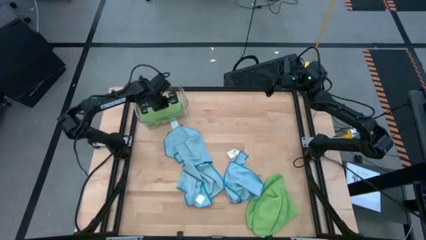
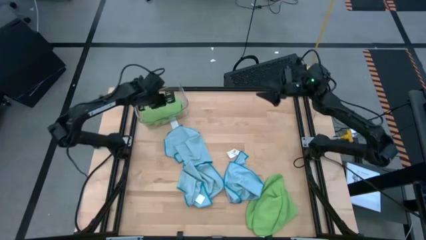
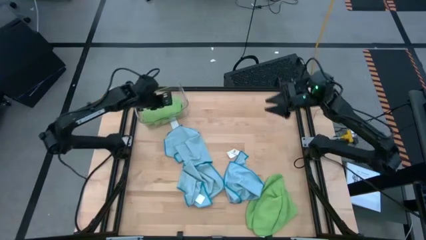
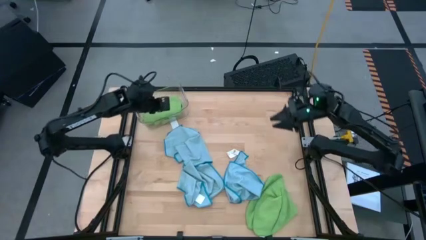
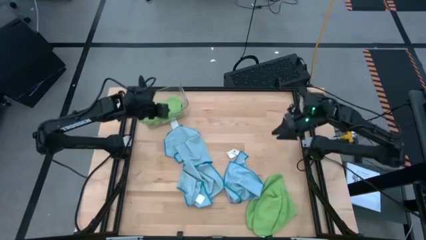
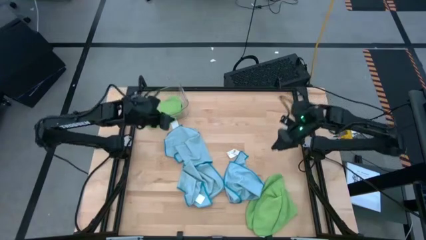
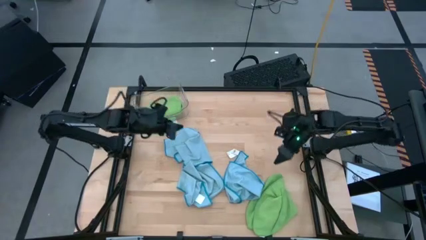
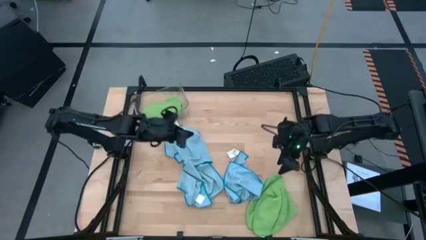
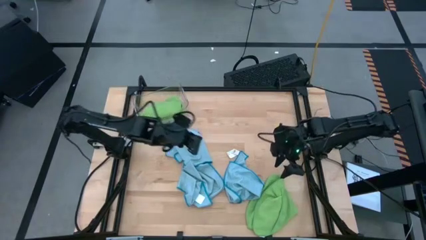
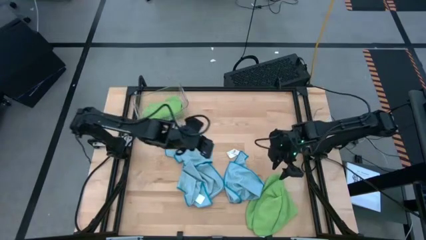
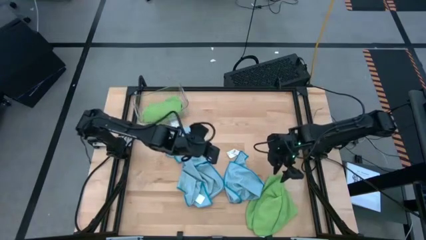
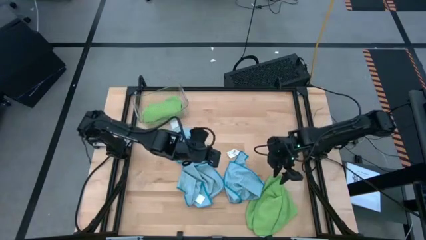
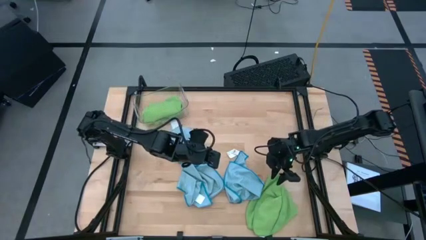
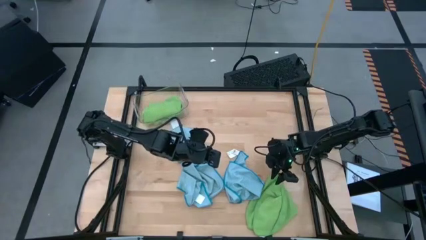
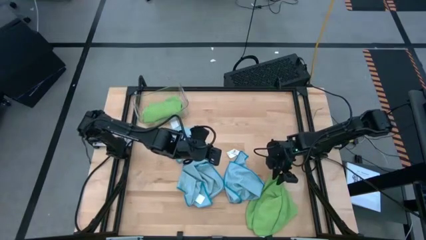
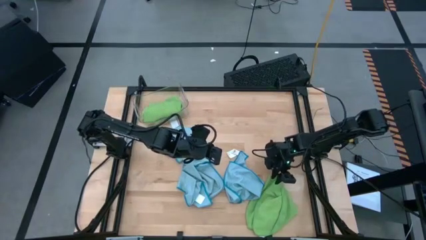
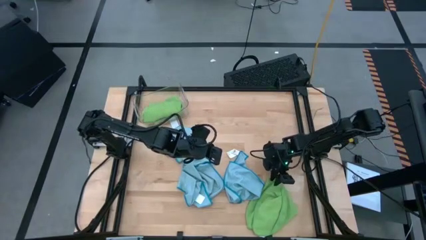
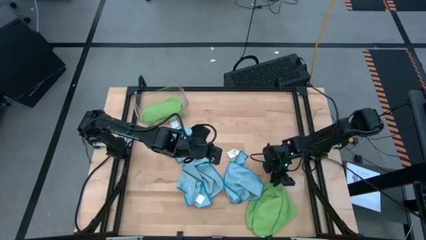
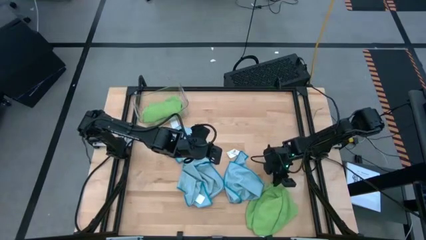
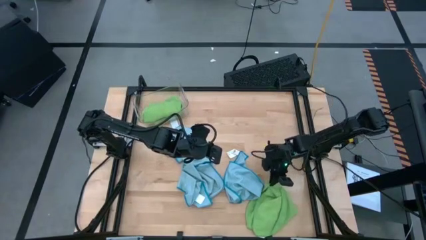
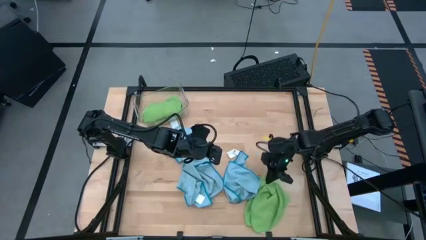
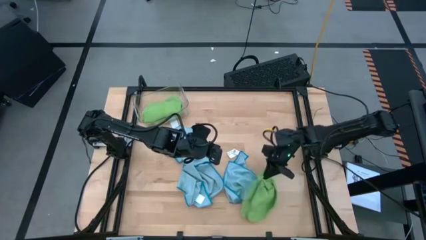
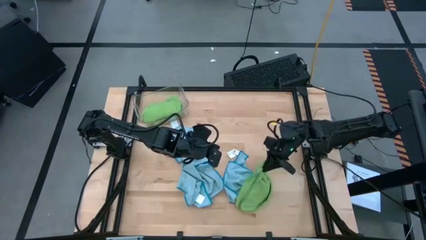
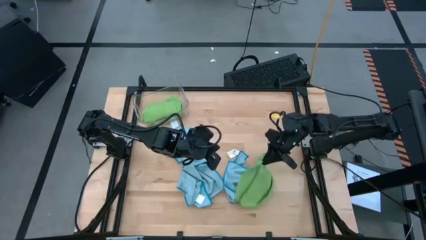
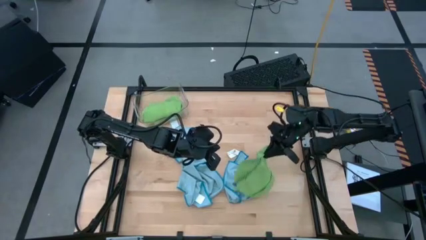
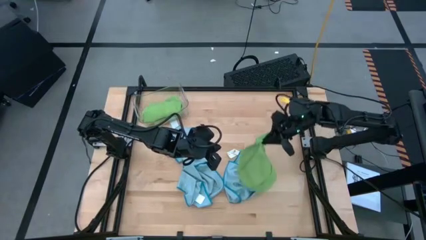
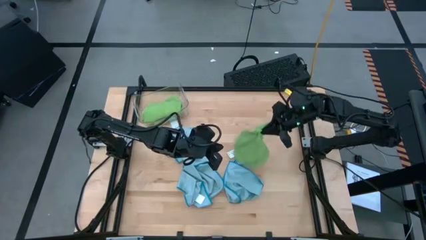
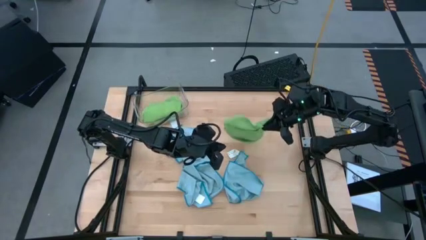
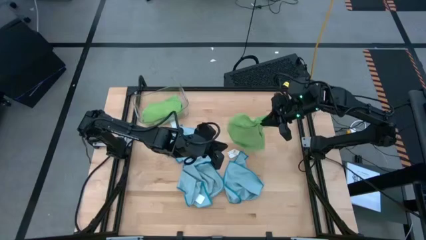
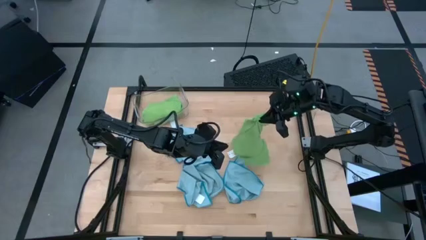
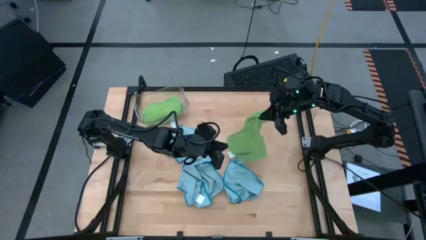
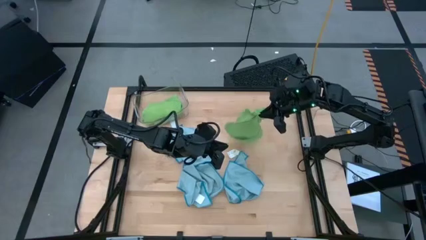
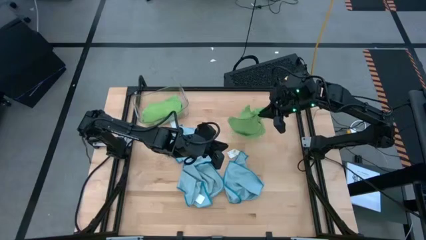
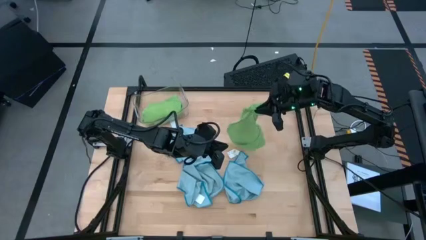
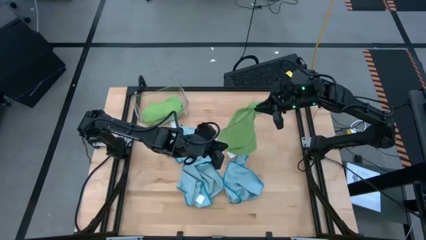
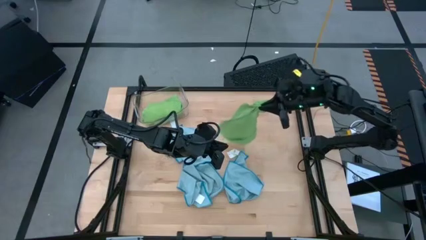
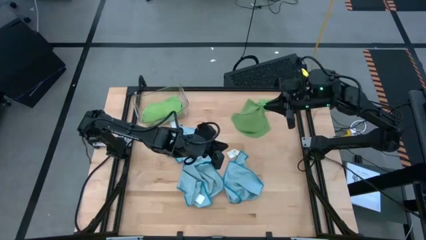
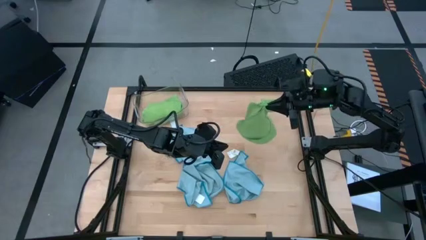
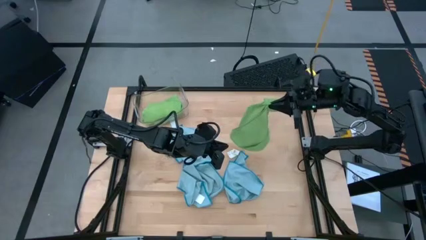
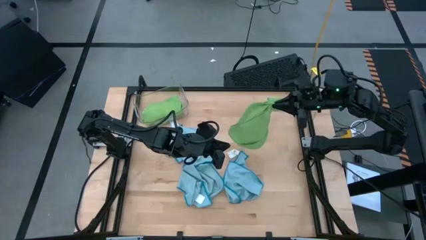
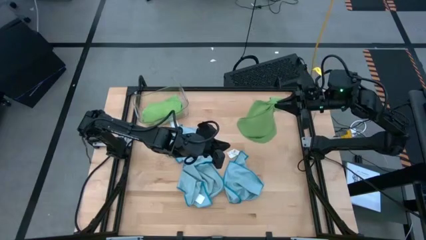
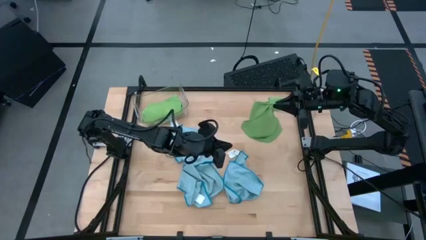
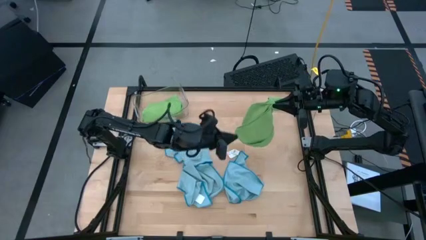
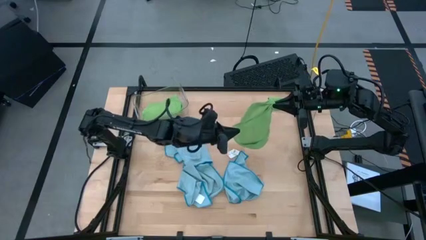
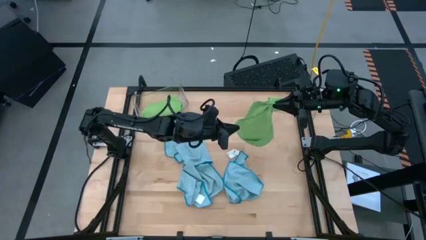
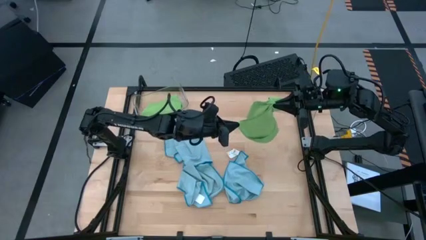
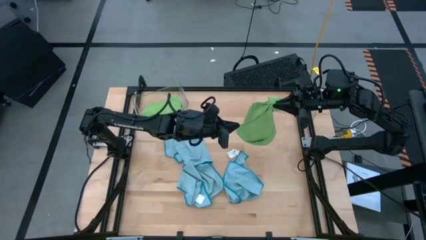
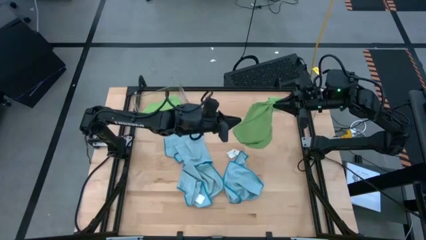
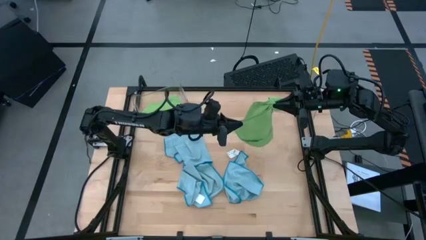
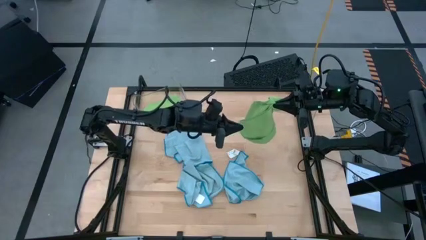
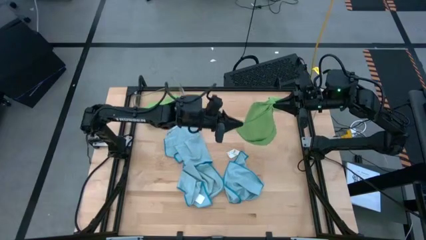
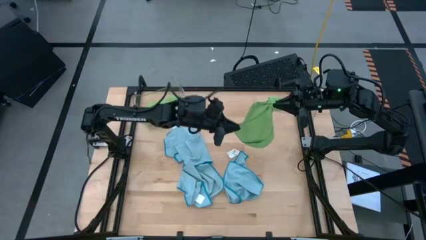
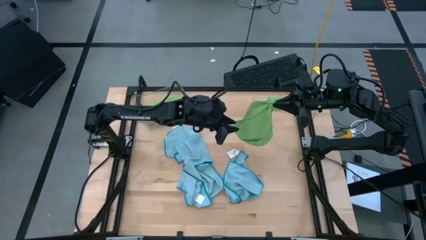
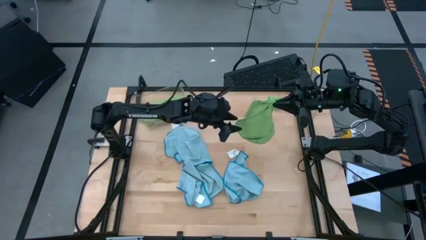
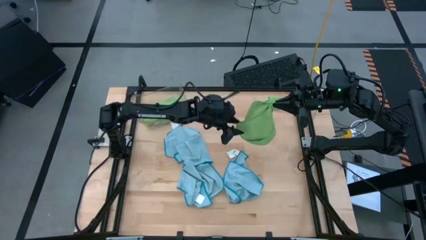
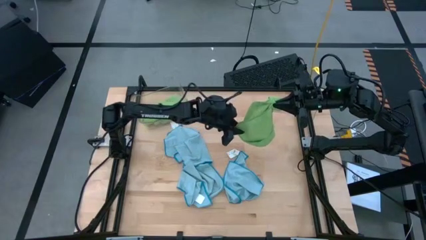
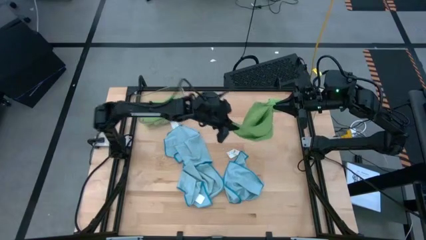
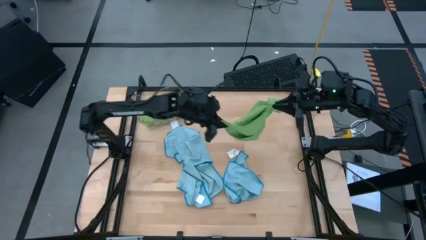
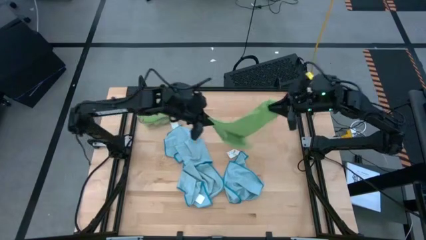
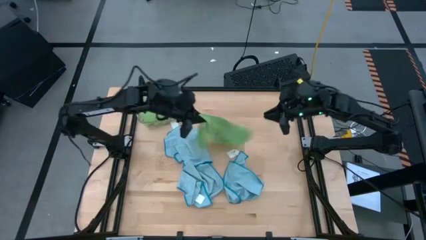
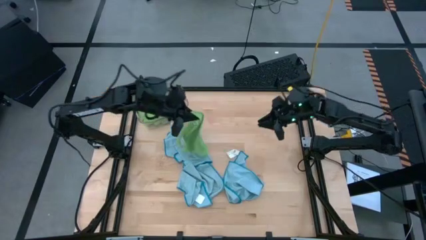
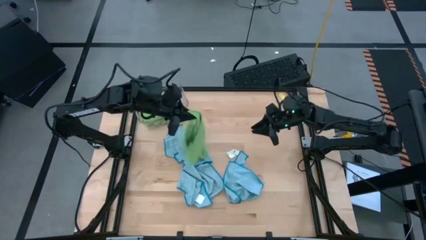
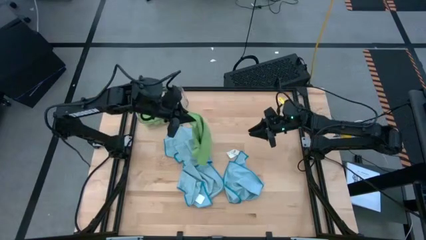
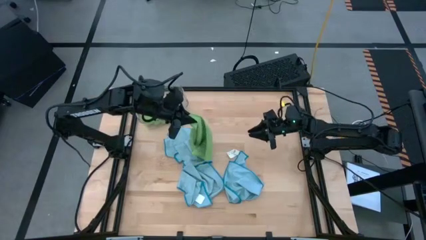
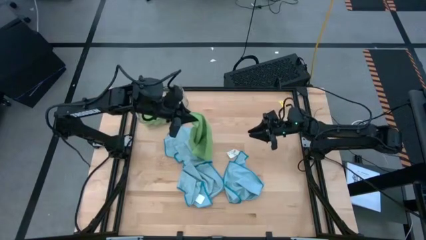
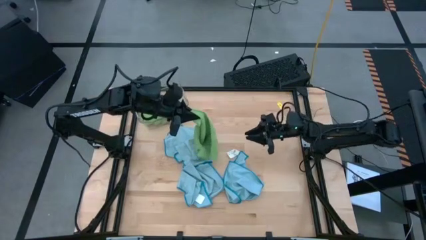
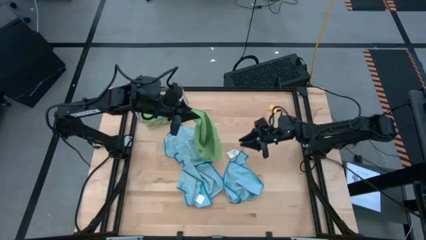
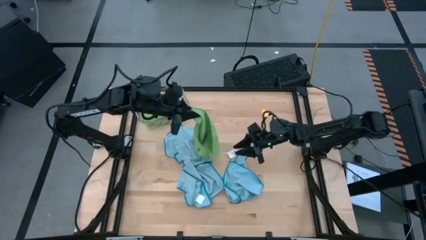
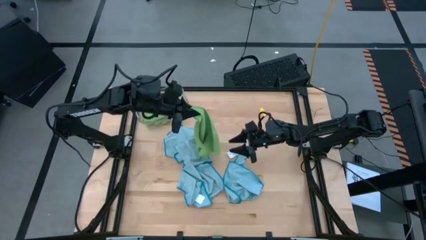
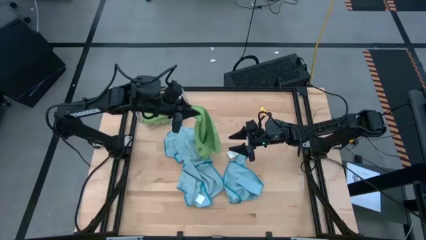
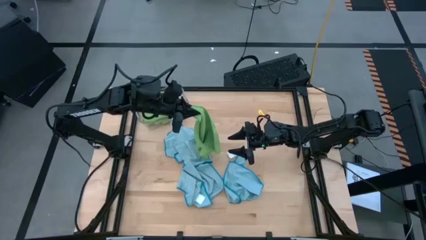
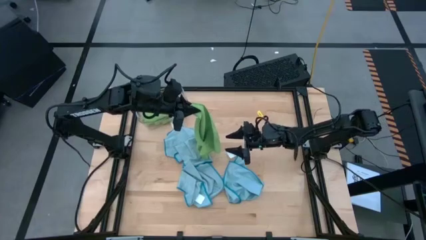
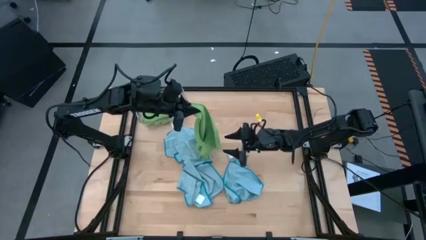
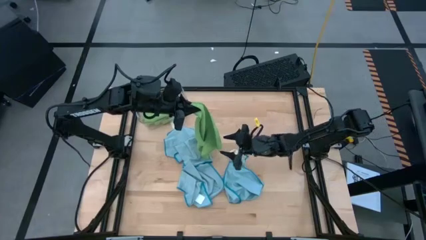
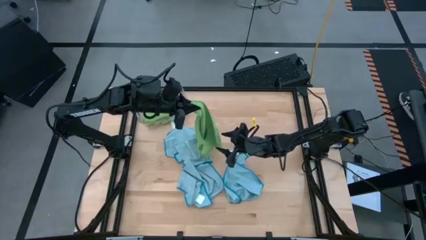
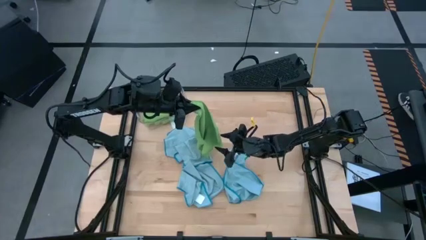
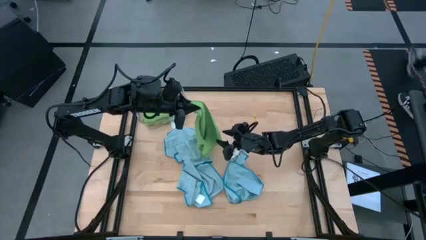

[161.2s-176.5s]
Task: Fold microfiber towels
Fold the green microfiber cloth

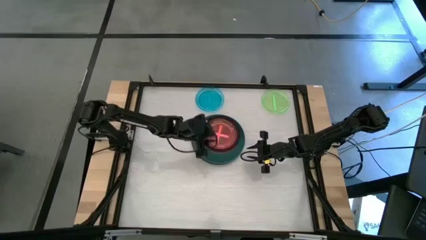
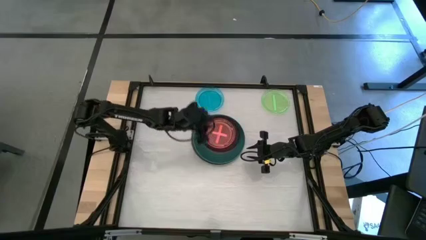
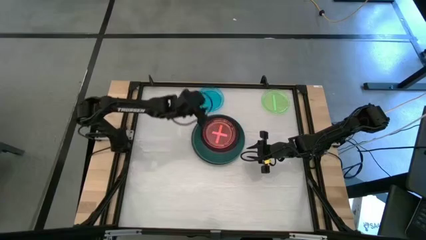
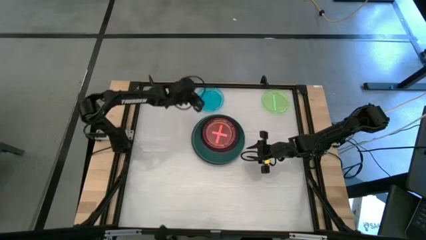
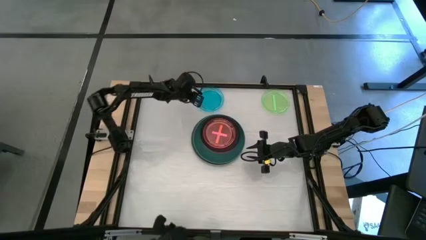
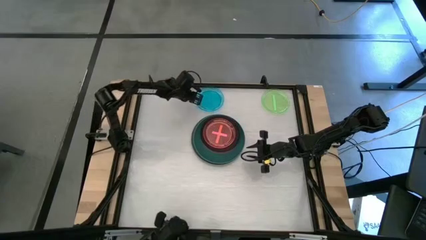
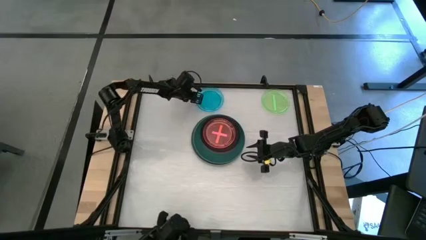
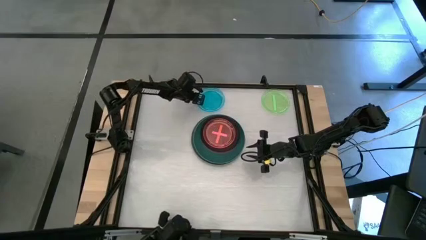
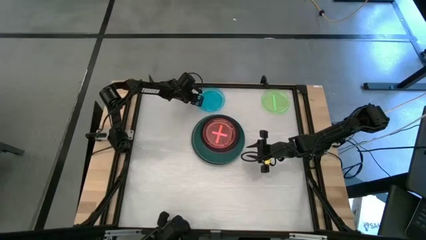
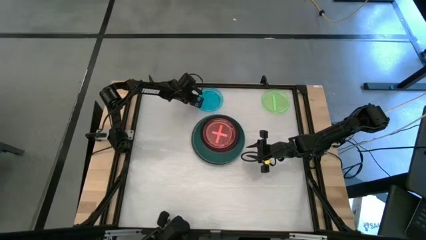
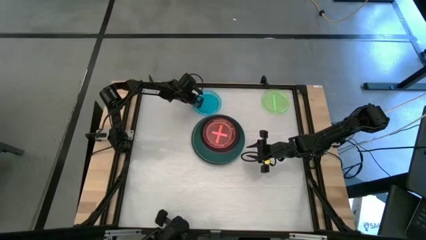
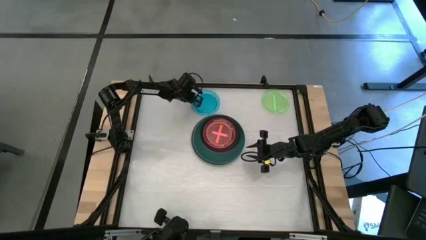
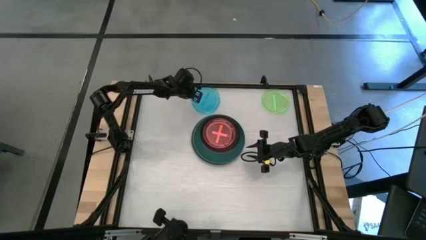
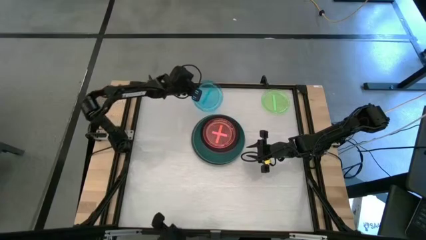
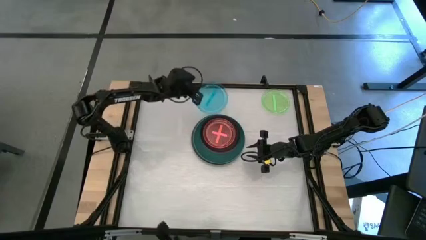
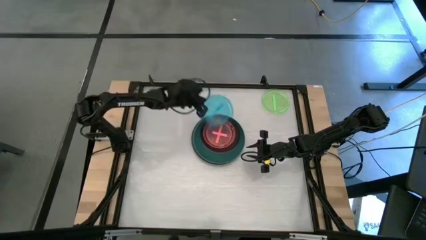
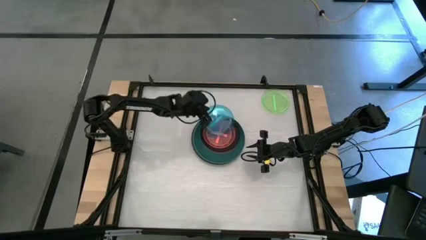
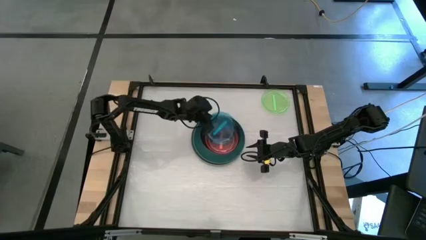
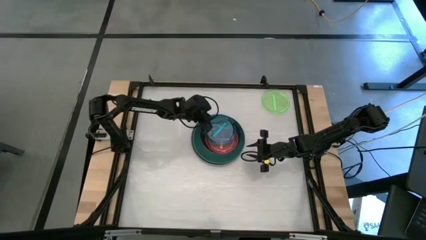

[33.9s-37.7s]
Task: Stack plastic plates
Stack the transparent blue plate on top of the transparent pink plate
